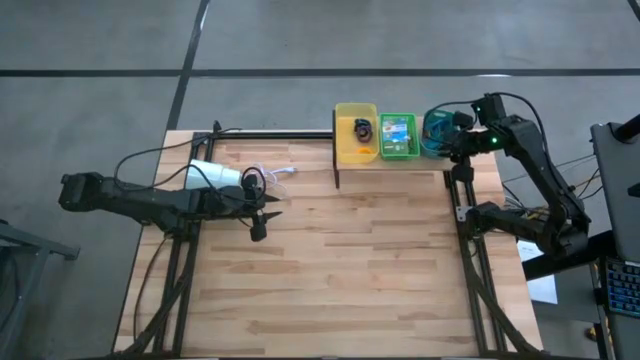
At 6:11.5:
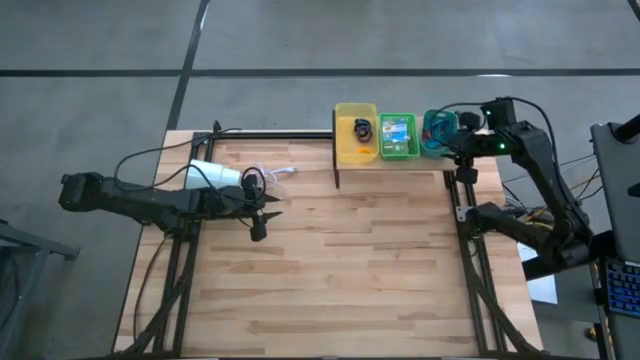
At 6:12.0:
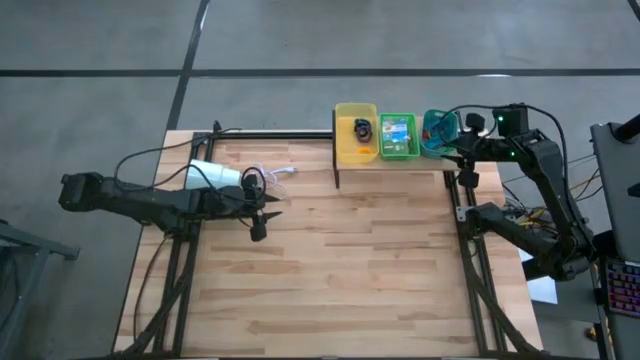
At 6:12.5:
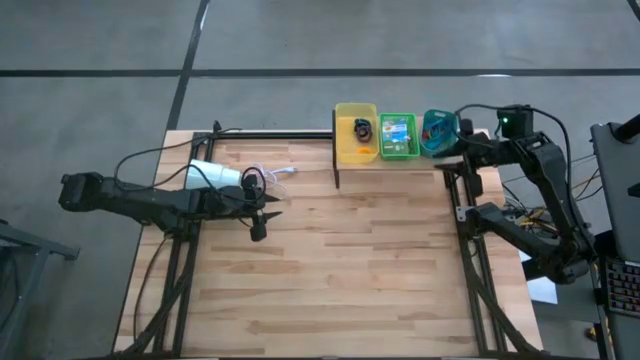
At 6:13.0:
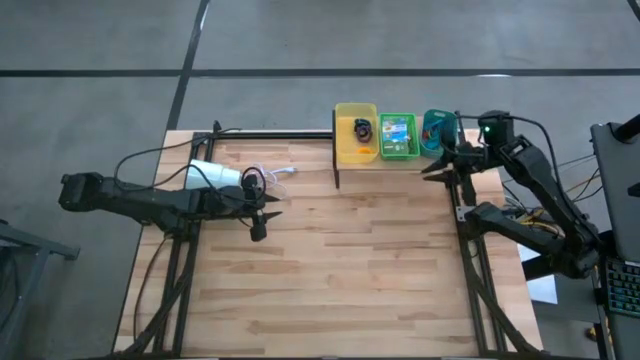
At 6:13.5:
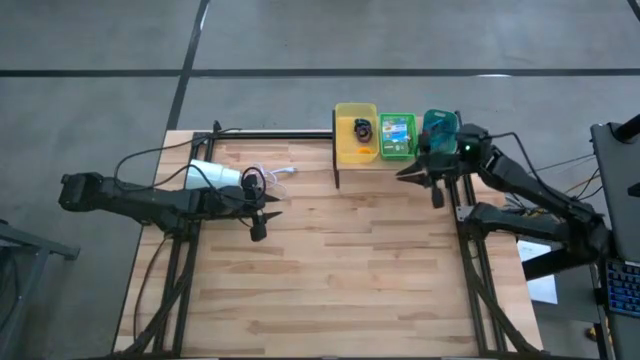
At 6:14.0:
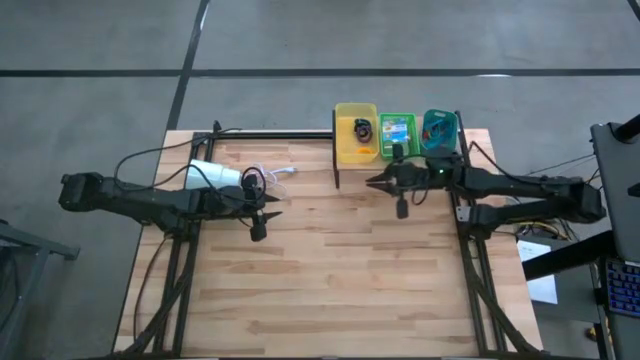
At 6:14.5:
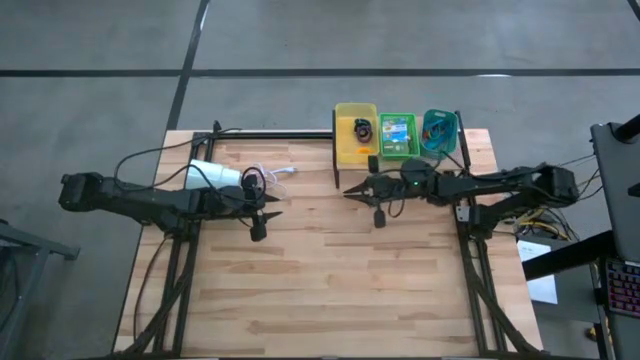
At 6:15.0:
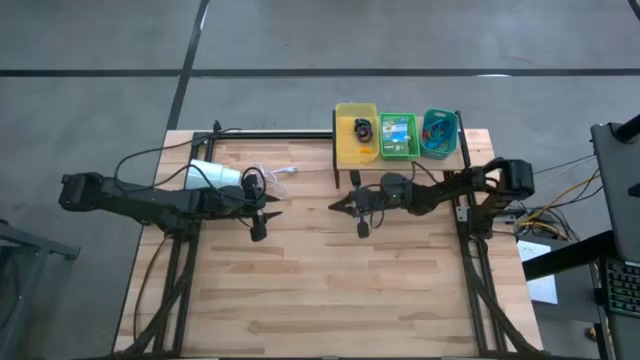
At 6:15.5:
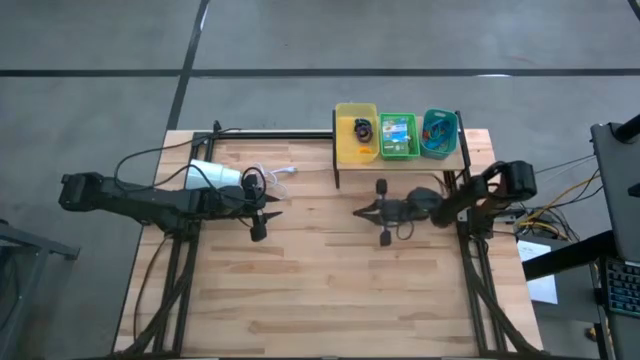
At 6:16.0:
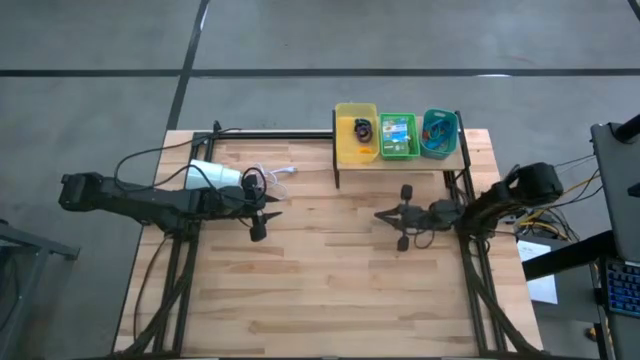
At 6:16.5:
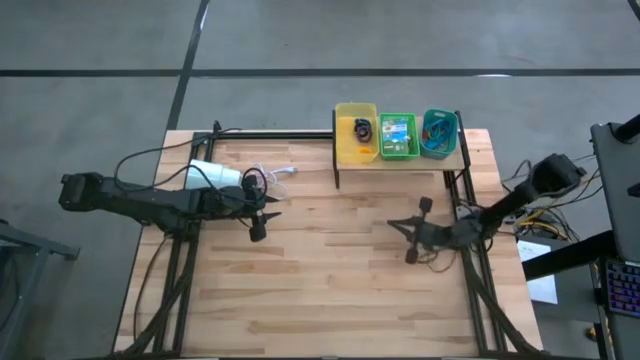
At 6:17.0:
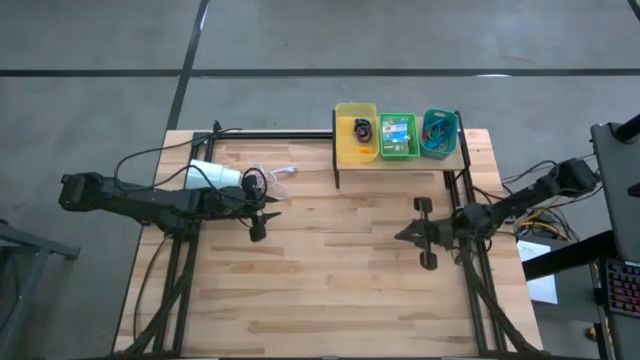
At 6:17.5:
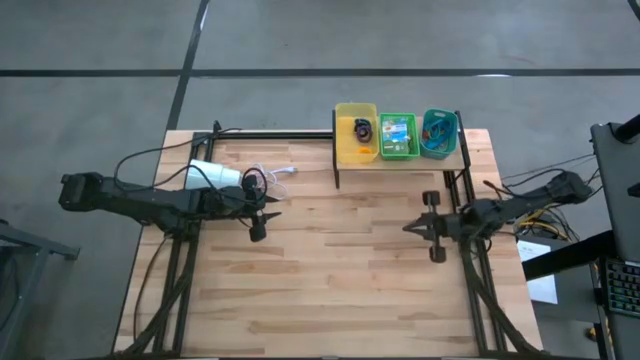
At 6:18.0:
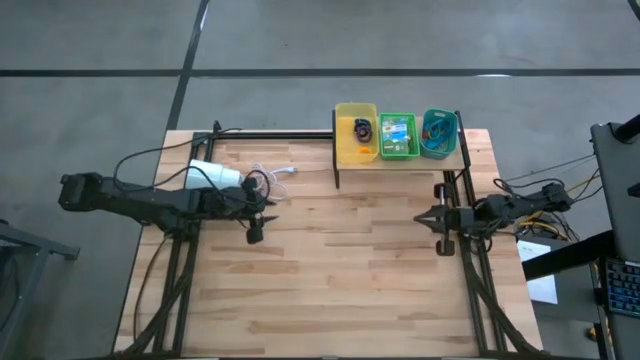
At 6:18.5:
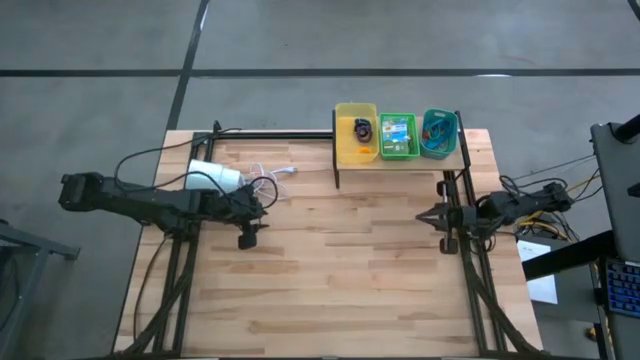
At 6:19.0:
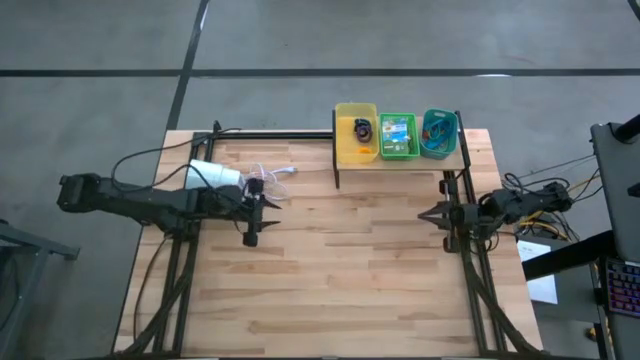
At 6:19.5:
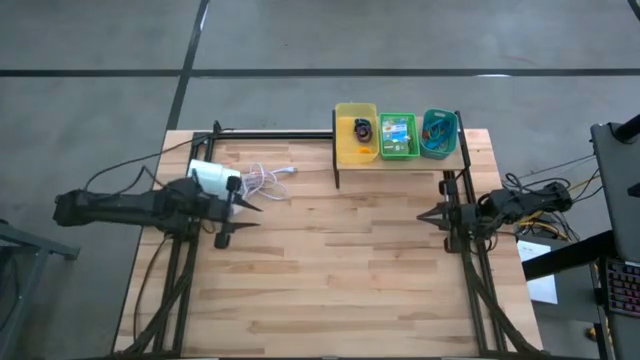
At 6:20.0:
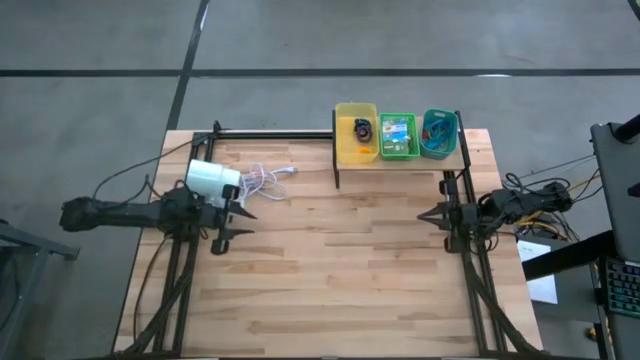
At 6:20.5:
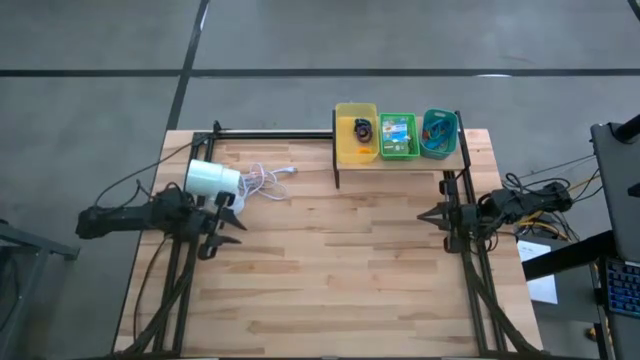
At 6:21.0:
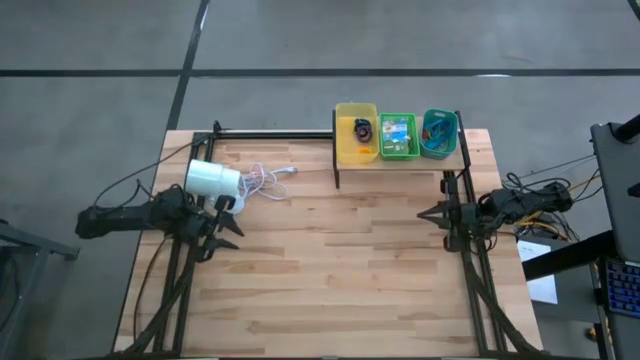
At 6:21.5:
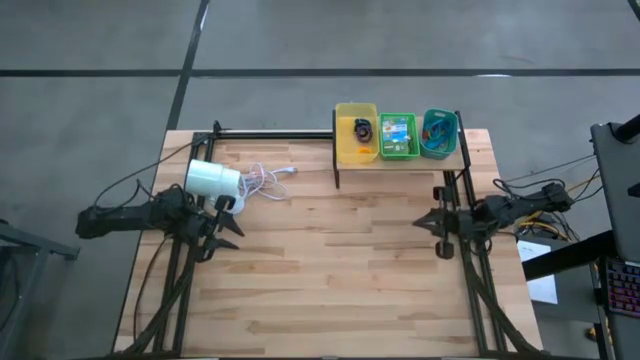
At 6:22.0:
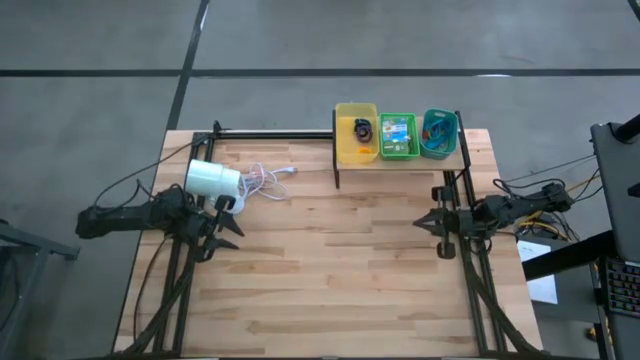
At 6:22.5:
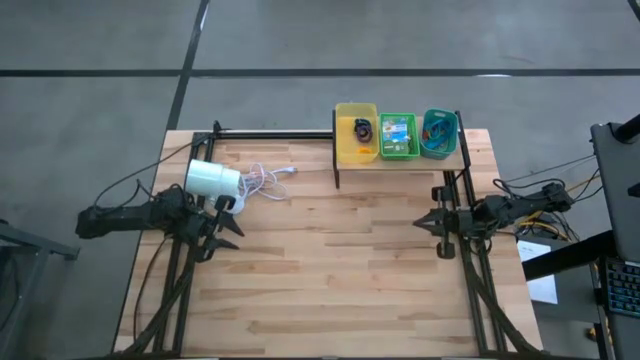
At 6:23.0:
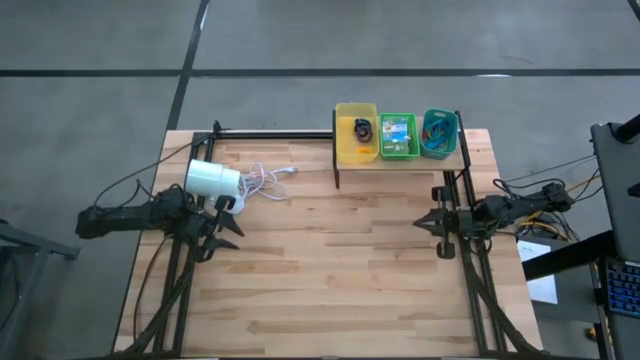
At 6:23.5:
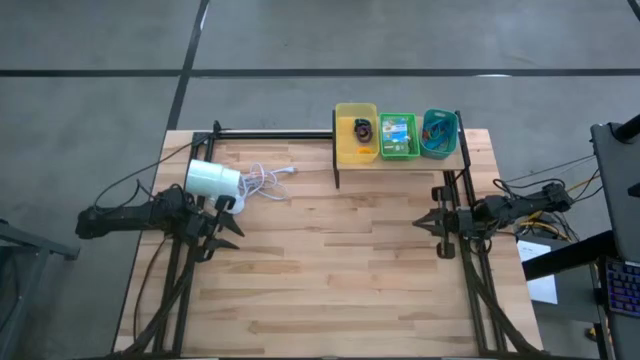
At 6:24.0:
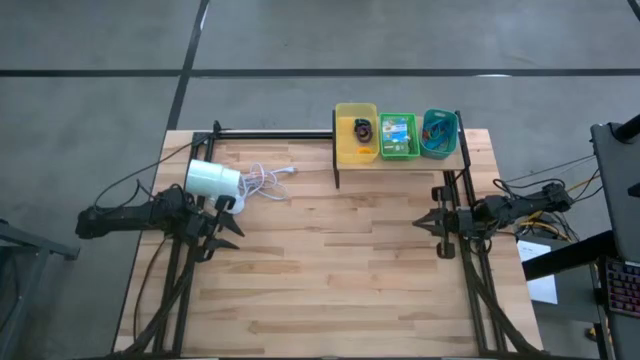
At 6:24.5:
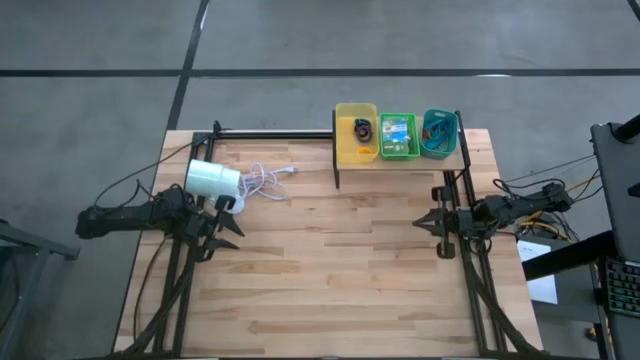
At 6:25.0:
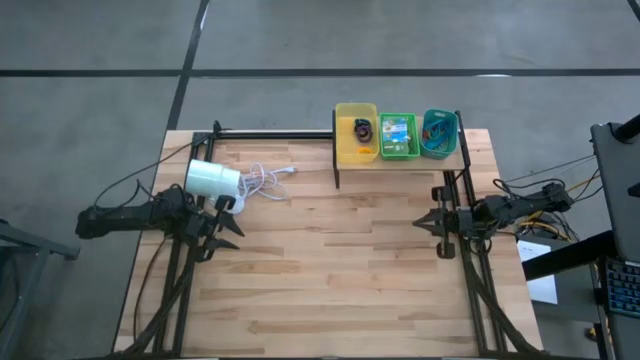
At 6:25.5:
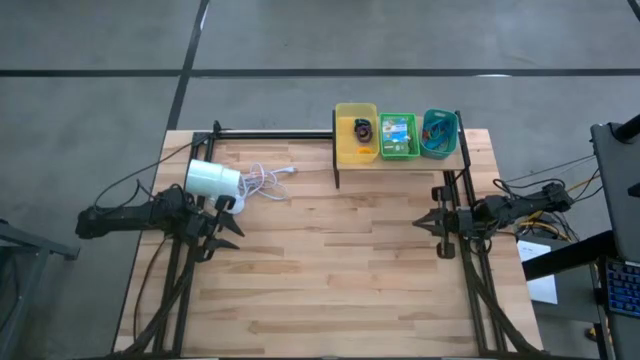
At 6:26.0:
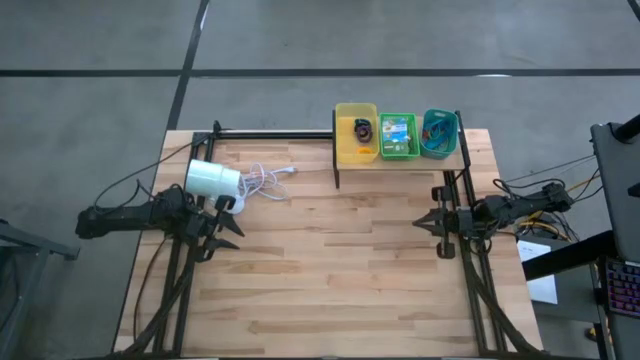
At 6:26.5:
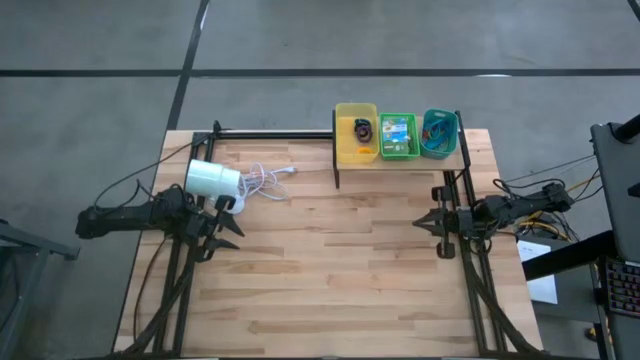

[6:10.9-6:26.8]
Task: Pick & Place Office Desk Supplies
Return to Home Position

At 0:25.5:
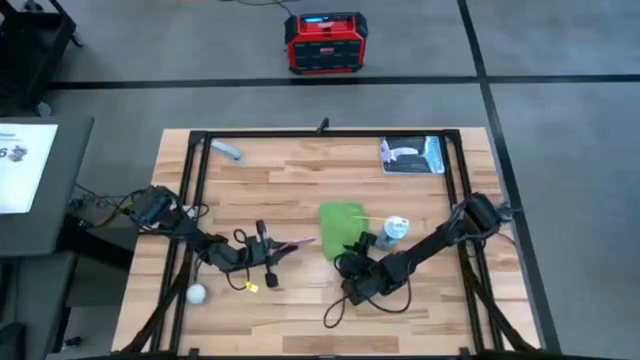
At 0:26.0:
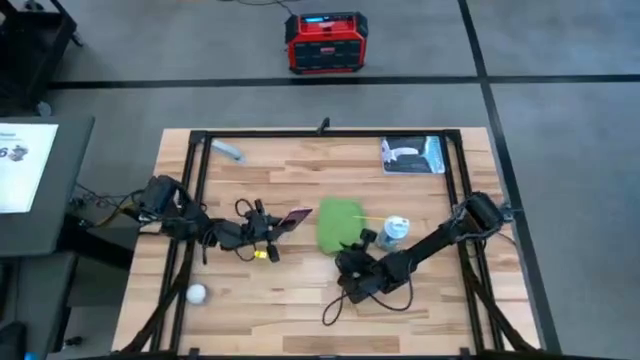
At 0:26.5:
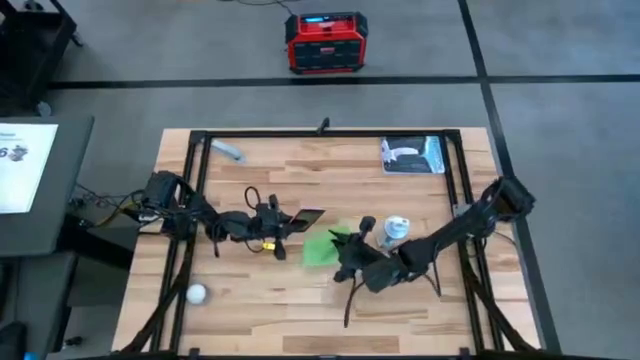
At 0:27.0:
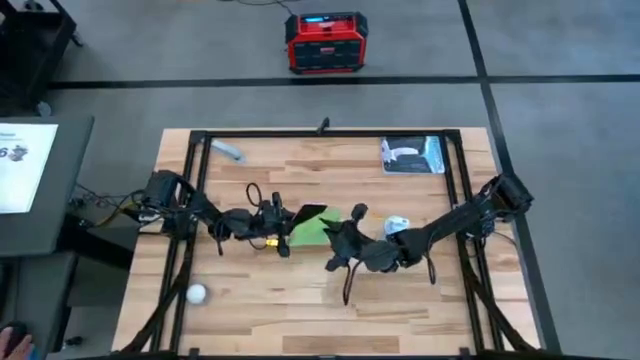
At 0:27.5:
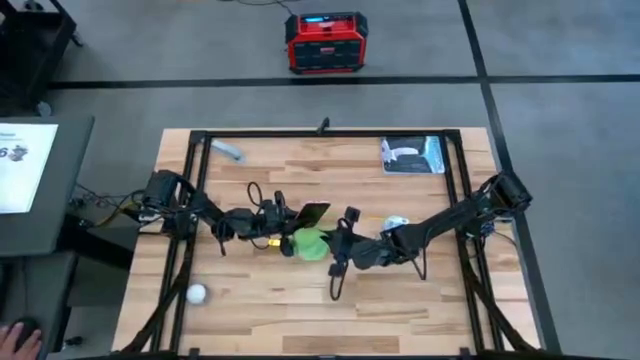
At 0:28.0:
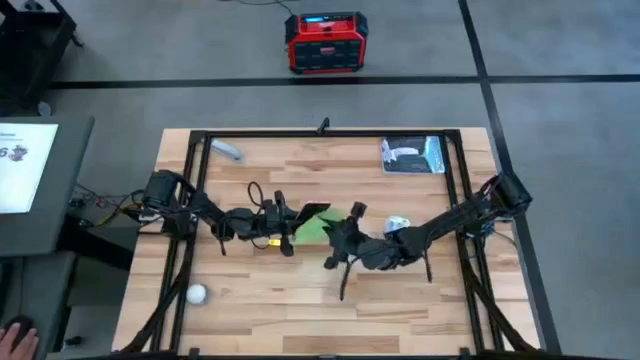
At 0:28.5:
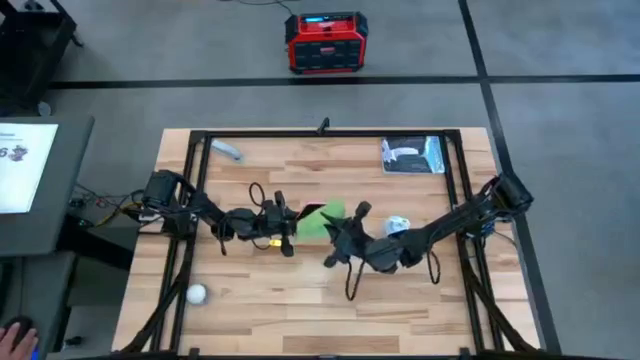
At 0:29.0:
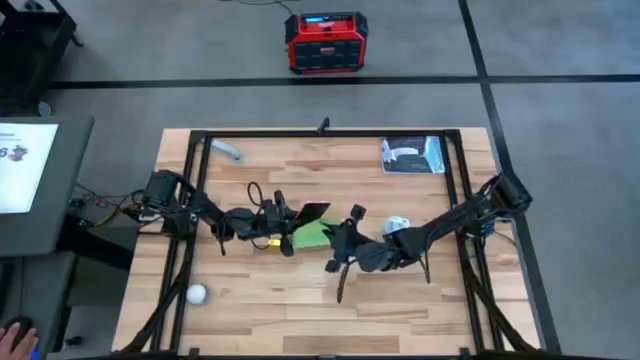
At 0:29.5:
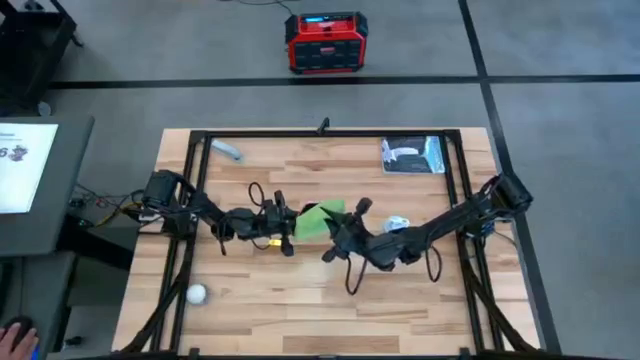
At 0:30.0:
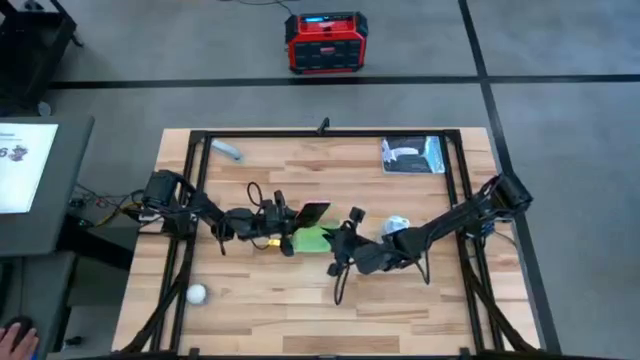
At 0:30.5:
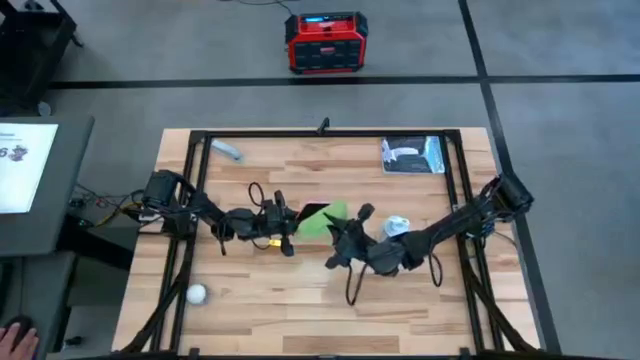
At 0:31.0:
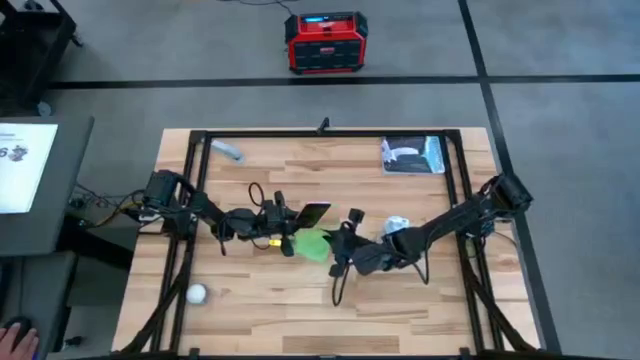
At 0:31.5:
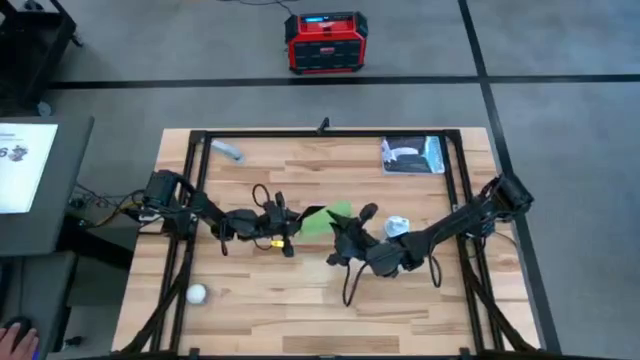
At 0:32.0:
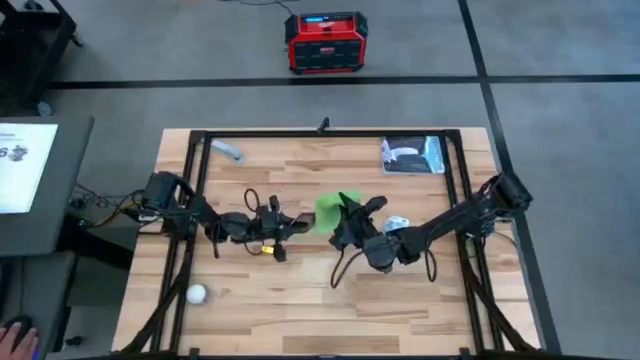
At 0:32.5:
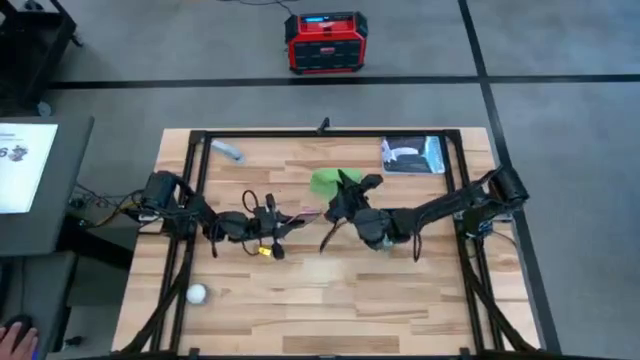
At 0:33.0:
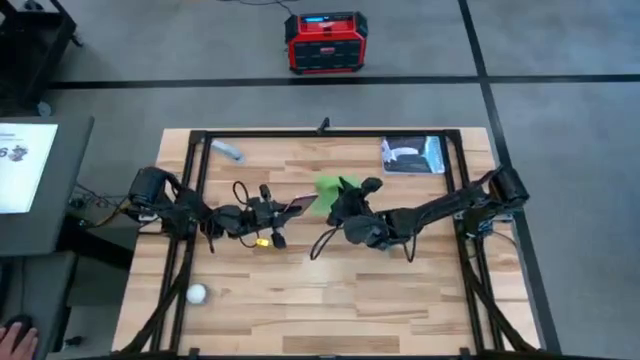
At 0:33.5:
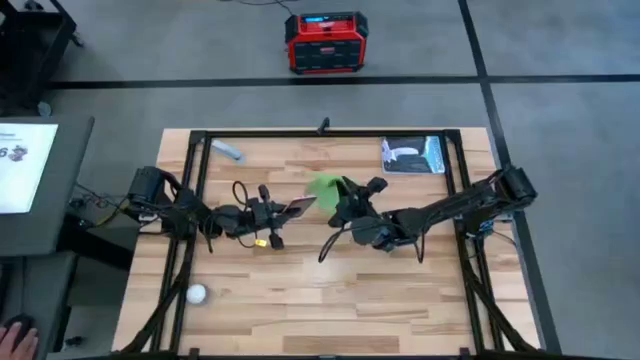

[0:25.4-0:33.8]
Task: Apply microfiber cloth
Wipe the cellphone with a microfiber cloth
